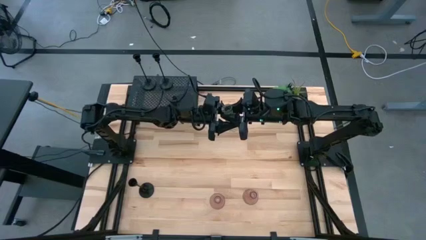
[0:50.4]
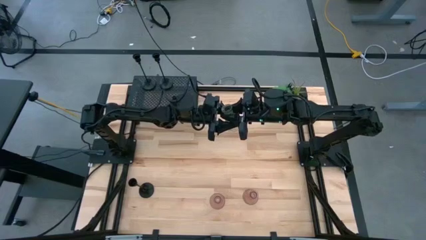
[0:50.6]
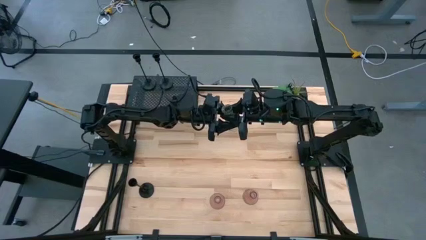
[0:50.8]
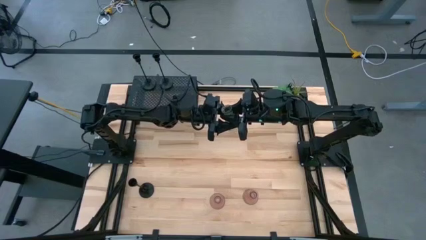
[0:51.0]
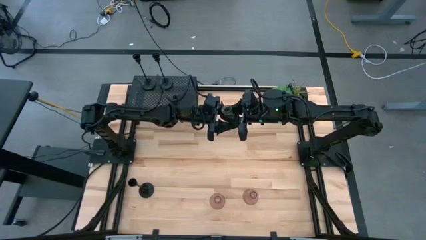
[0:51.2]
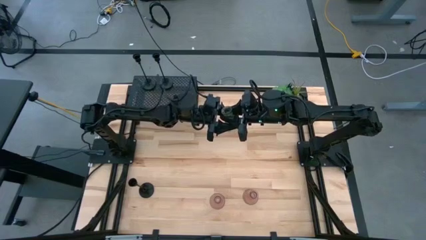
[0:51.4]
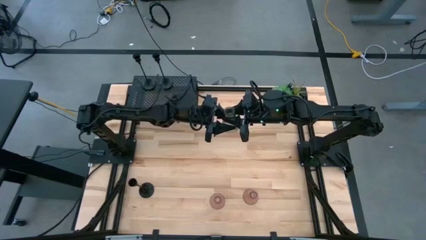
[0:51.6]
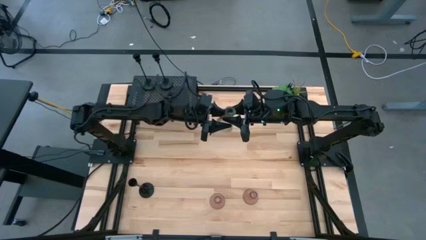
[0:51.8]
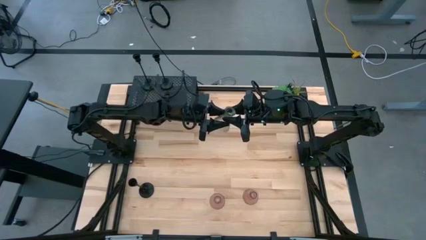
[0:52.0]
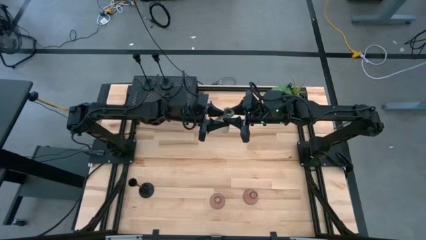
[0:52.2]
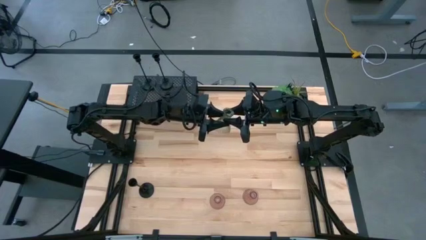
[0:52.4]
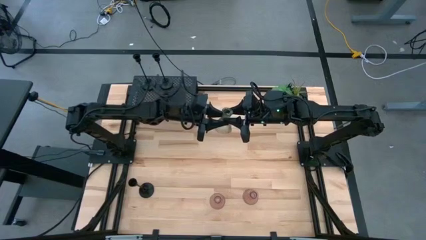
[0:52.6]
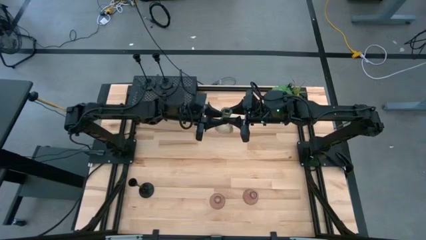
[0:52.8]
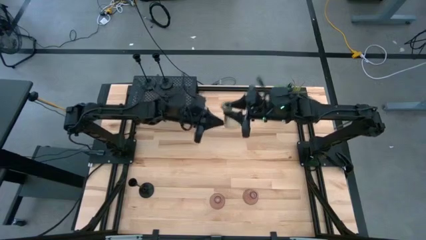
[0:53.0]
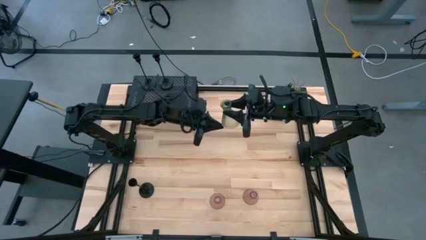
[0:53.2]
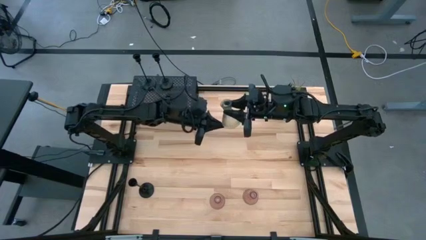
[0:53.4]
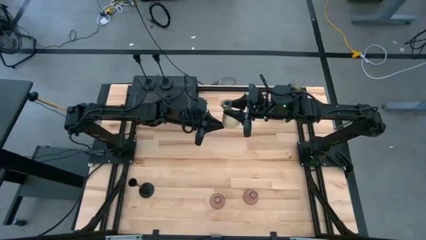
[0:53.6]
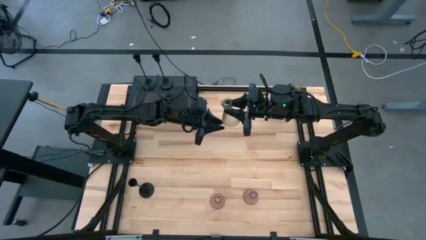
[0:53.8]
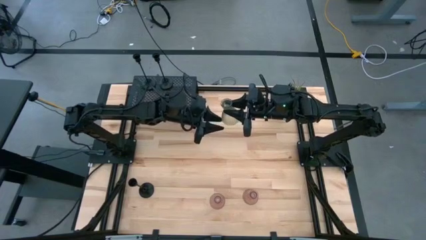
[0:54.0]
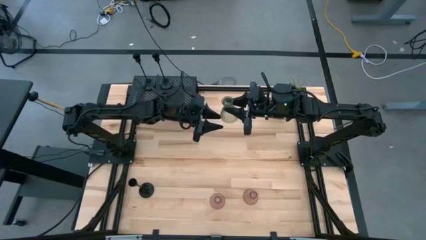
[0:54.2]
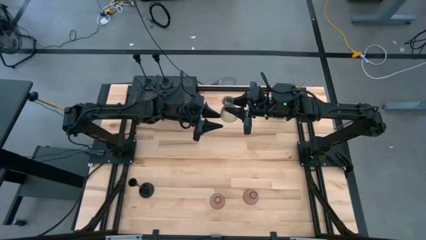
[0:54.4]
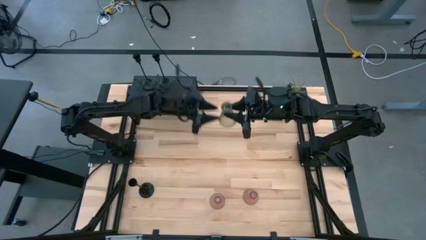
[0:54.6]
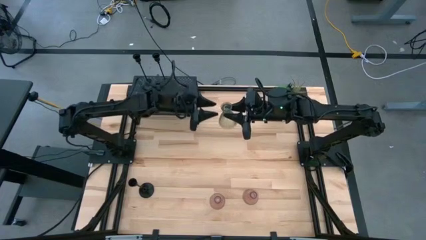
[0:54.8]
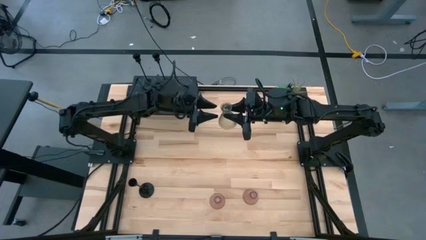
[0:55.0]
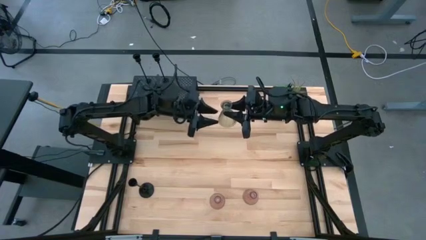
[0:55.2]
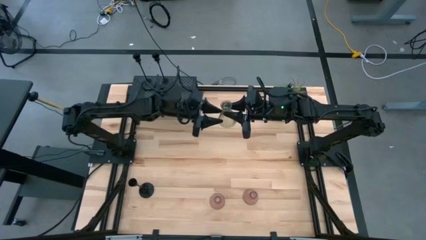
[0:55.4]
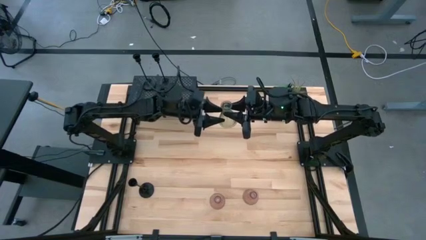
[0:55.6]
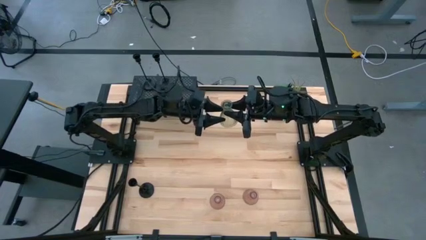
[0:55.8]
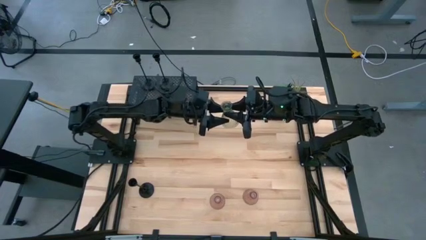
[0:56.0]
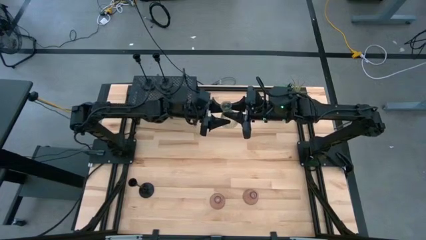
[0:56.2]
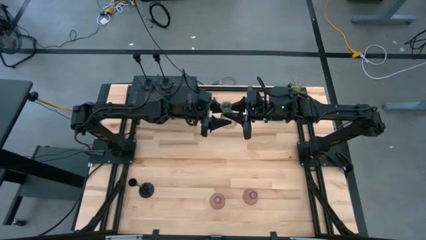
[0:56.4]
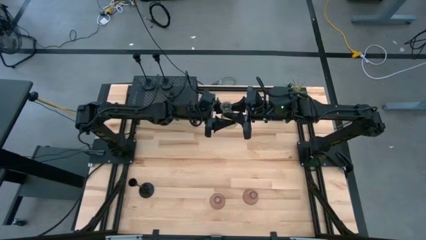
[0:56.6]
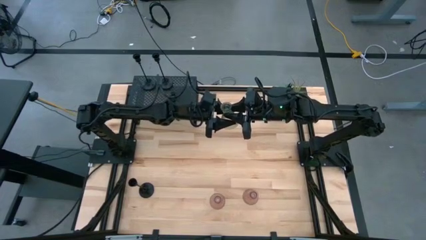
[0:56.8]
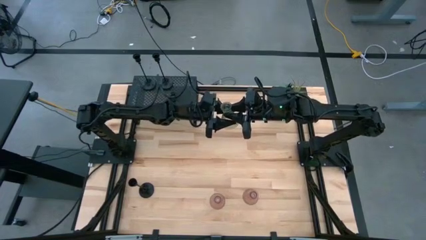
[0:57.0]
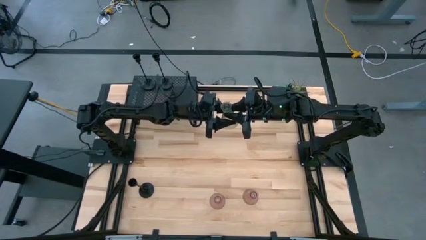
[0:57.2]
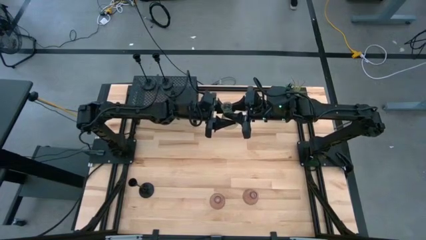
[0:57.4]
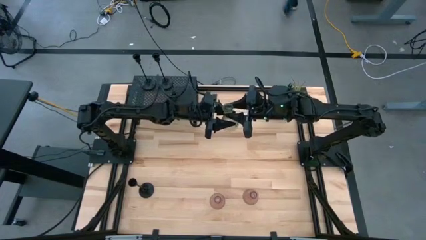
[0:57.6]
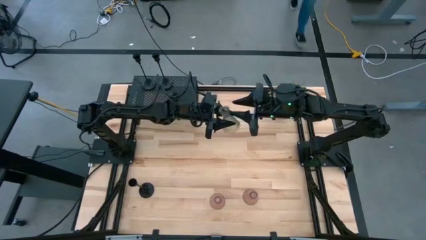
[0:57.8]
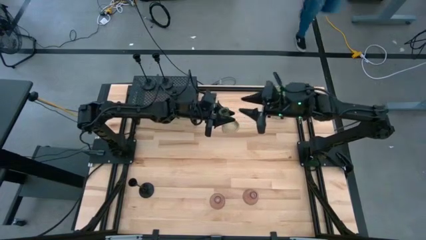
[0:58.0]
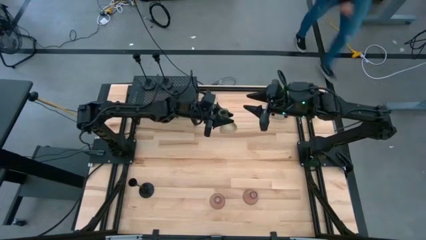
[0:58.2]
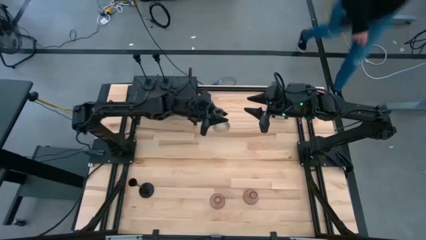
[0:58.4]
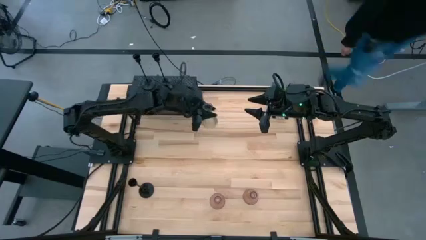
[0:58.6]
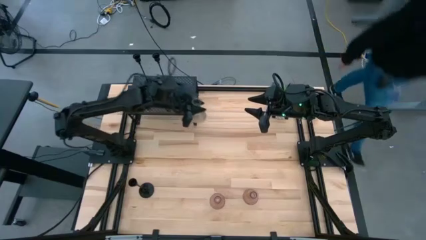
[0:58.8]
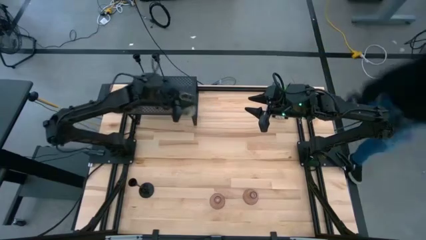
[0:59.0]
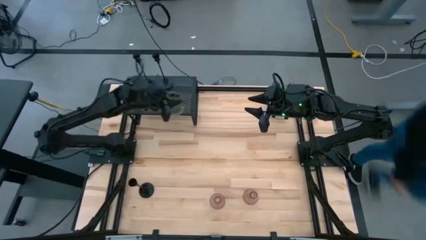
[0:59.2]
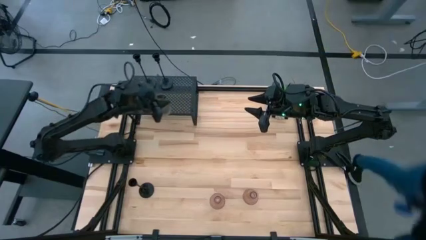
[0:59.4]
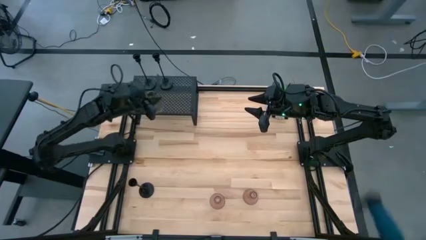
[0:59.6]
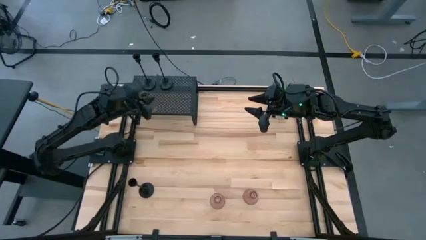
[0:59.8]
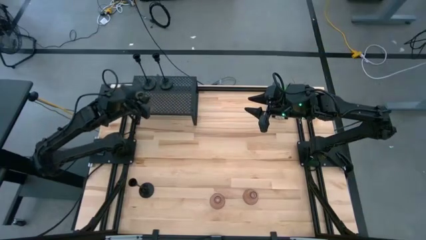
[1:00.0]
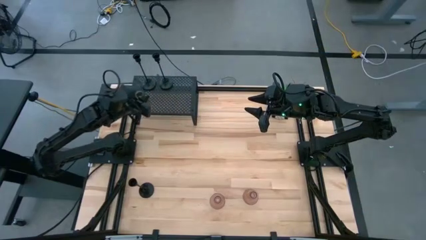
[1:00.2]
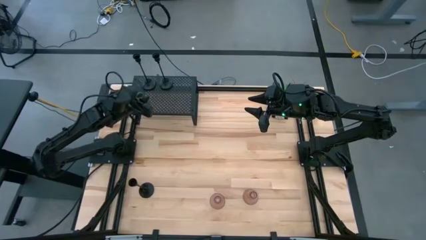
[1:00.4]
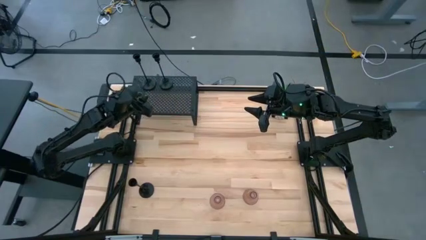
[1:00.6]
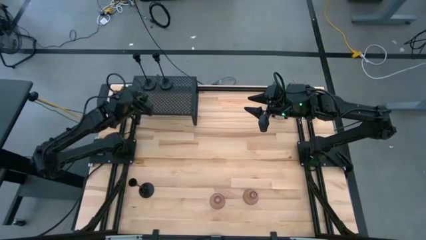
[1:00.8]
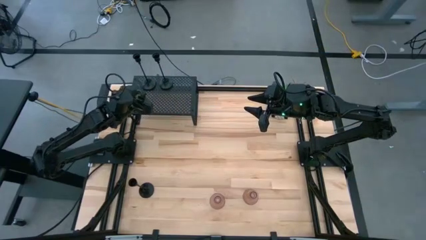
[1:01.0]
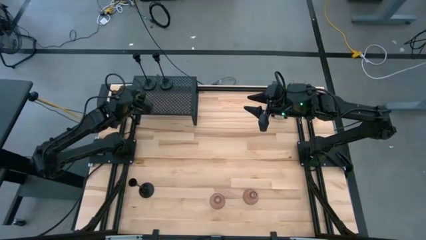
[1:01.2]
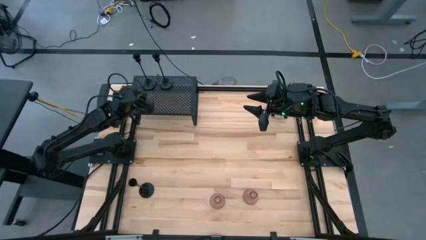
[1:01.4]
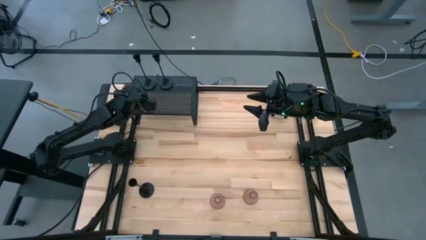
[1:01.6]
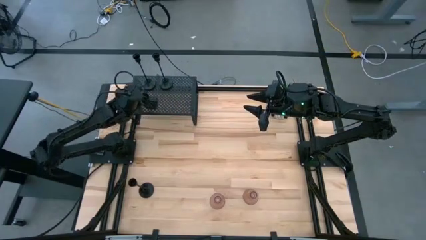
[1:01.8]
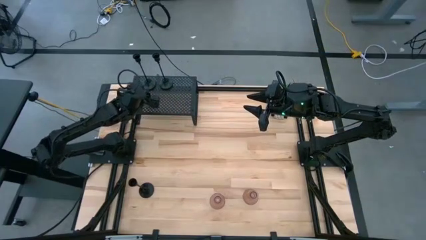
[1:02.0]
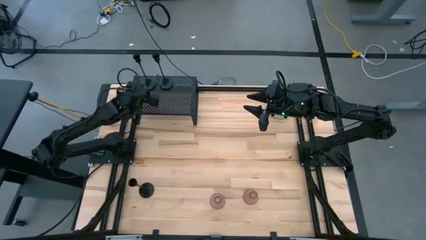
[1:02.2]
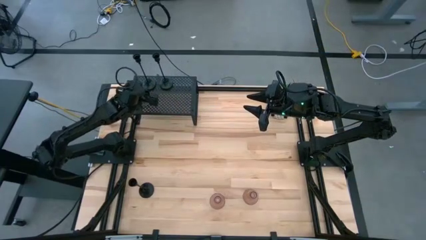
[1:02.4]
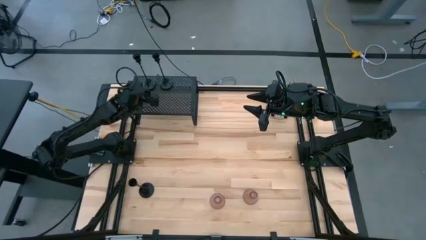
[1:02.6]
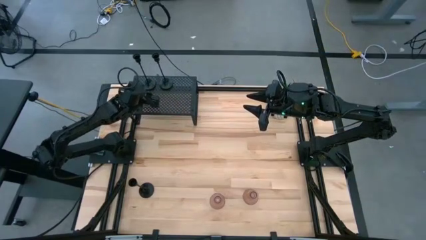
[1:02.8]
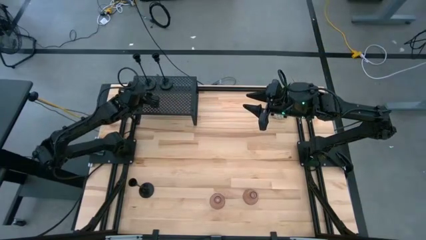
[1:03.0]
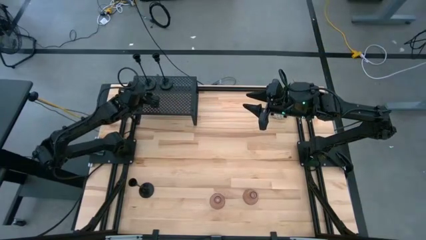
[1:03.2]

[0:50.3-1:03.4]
Task: Pick & Place candle stick holders
Put the green glass candle holder on the shelf

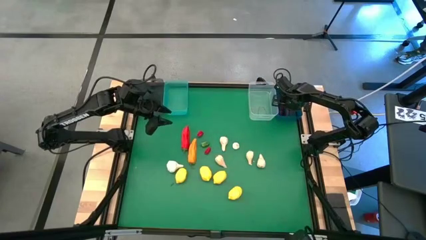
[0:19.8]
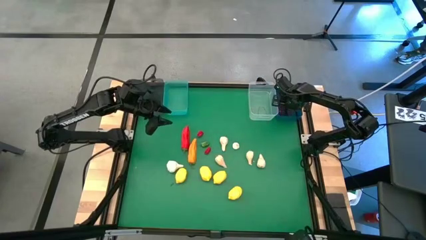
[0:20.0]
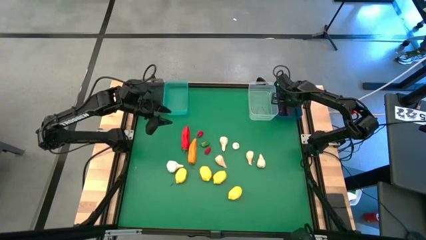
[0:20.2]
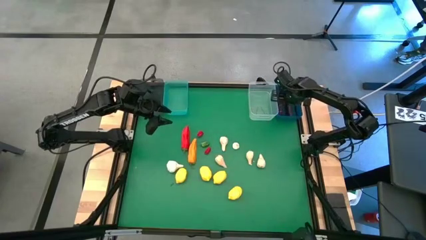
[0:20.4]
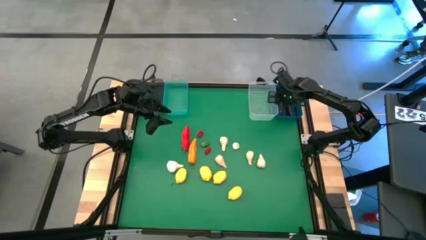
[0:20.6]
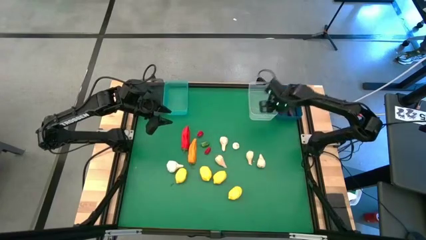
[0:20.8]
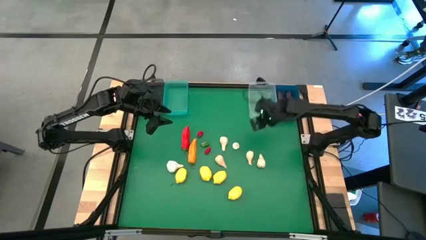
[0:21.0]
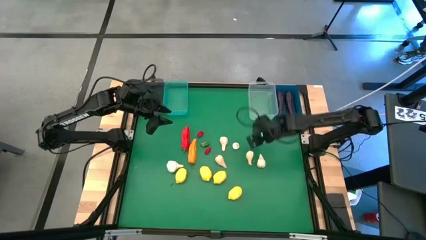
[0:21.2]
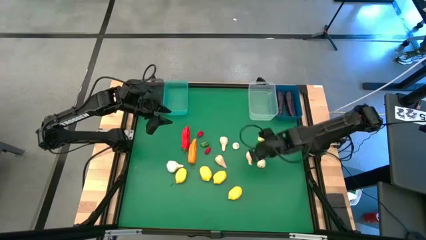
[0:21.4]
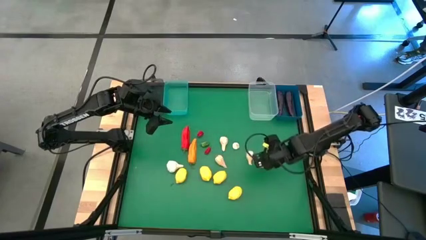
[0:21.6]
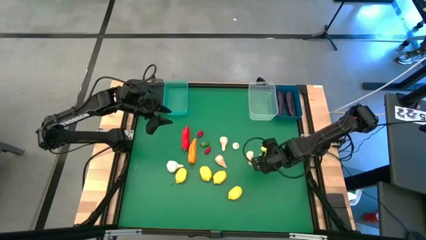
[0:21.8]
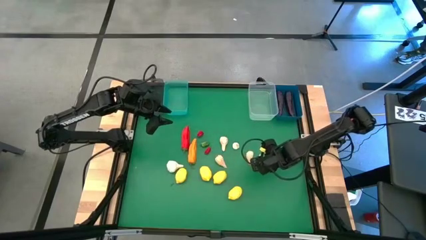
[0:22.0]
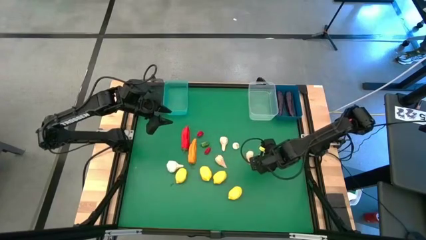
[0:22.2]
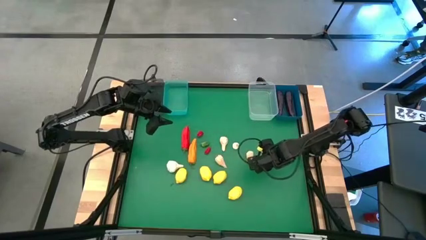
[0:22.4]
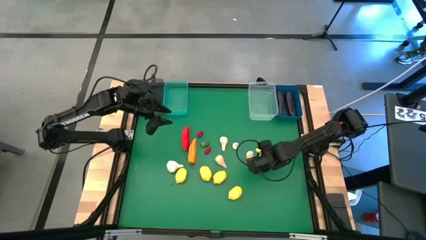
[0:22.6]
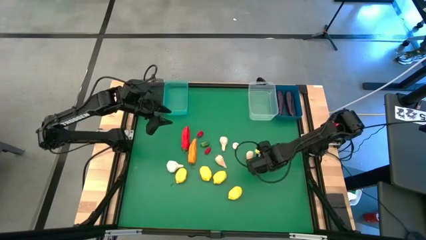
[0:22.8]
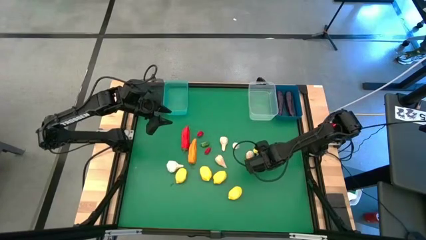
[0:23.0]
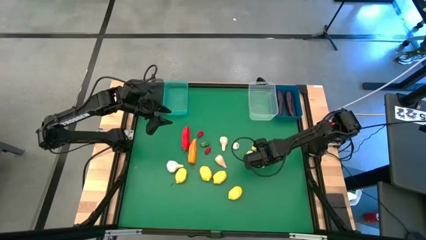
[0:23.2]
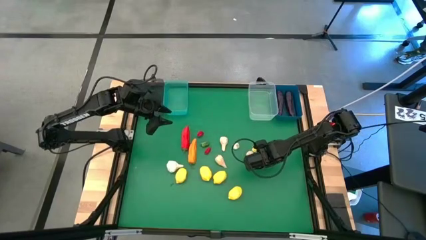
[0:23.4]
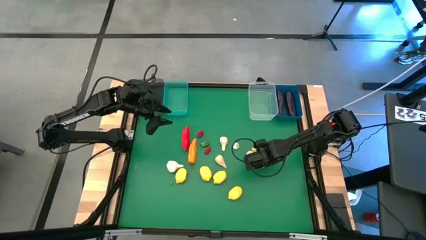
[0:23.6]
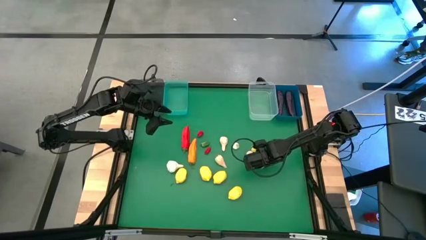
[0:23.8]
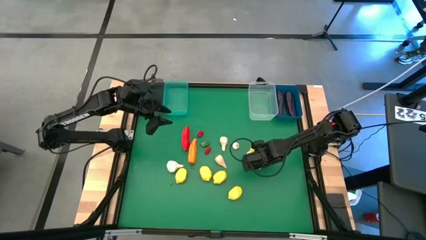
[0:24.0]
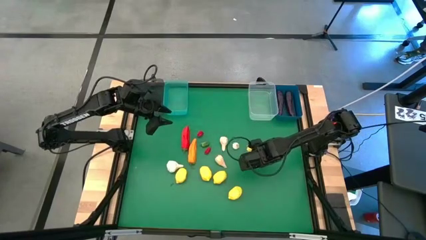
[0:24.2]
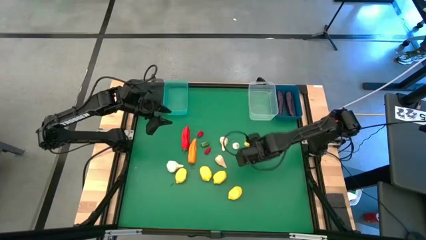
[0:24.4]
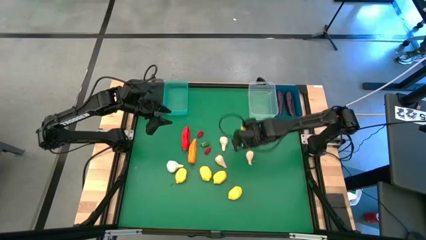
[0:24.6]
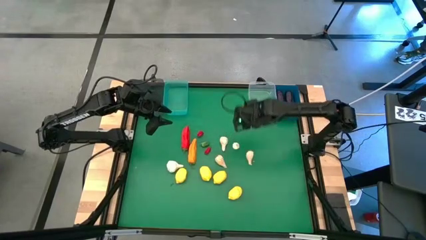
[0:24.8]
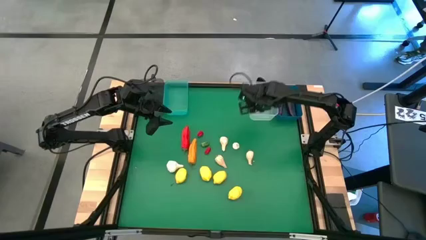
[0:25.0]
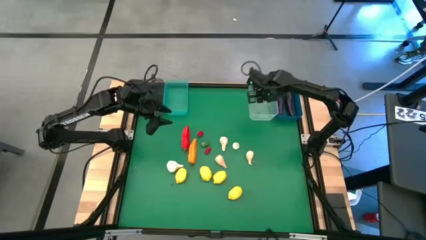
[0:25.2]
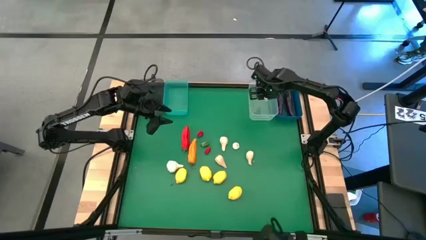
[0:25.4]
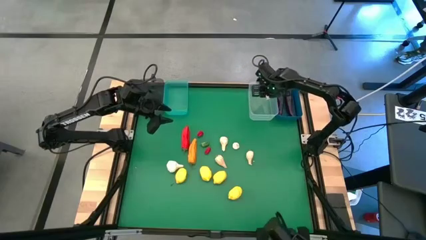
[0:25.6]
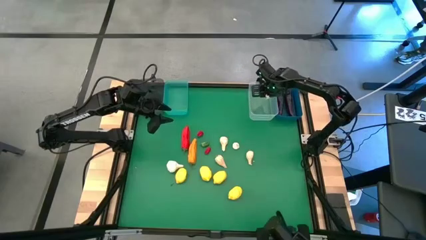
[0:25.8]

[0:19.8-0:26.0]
Task: Sort produce into baskets
Put the garlic into the transparent bin
